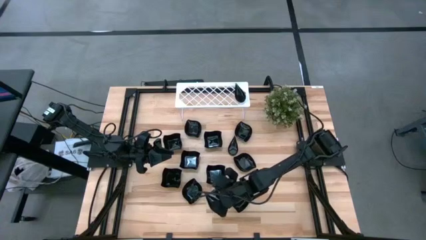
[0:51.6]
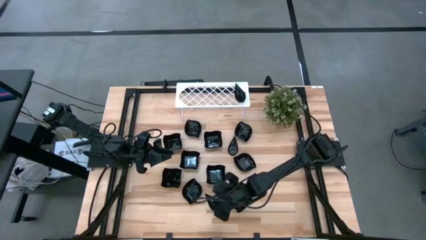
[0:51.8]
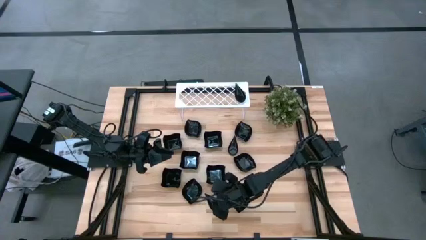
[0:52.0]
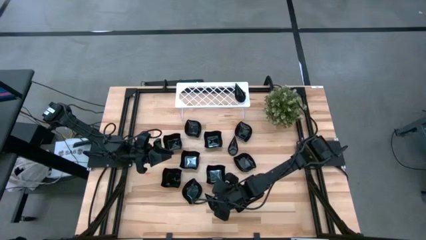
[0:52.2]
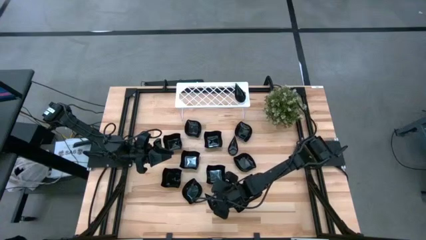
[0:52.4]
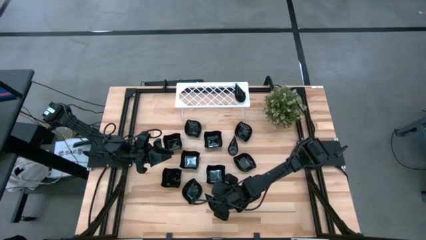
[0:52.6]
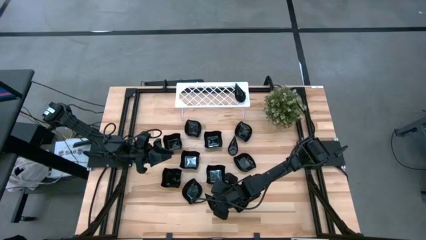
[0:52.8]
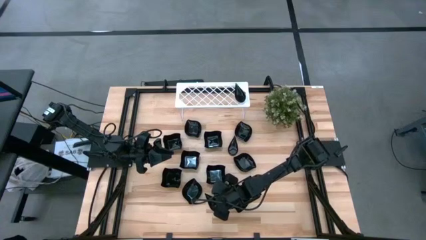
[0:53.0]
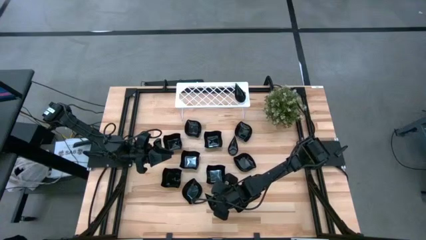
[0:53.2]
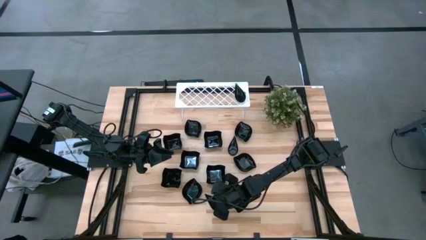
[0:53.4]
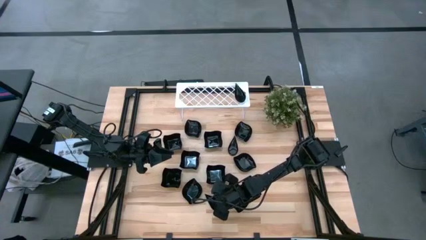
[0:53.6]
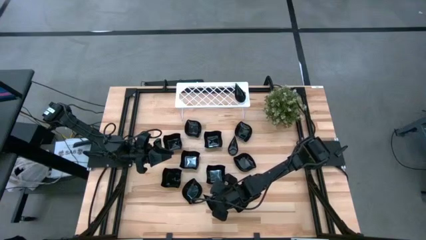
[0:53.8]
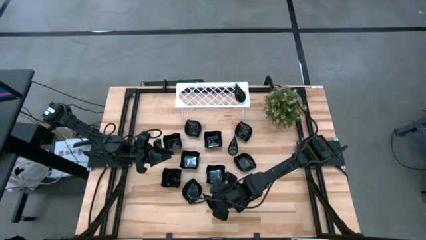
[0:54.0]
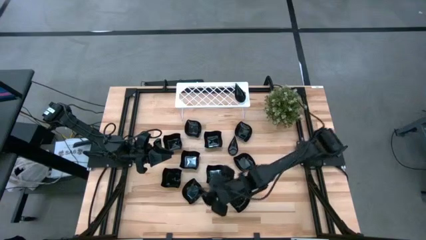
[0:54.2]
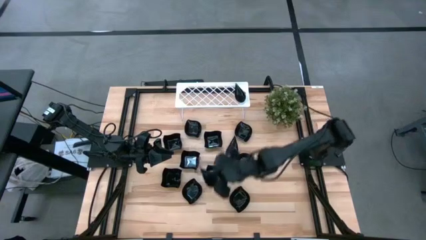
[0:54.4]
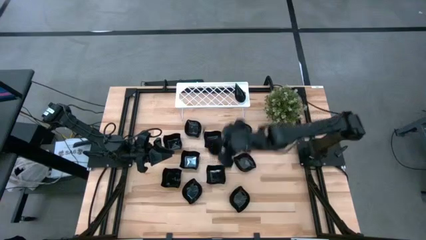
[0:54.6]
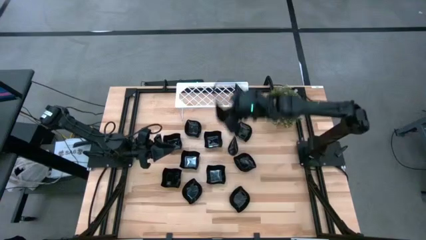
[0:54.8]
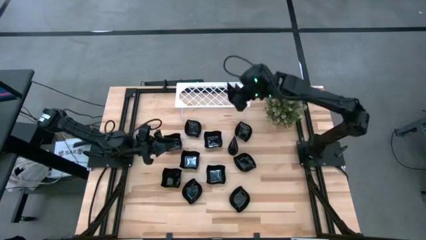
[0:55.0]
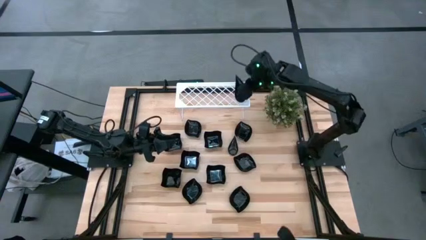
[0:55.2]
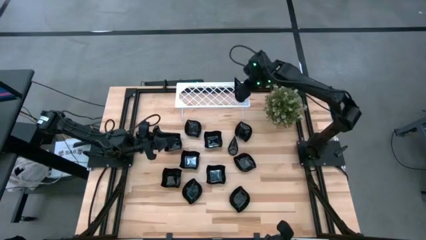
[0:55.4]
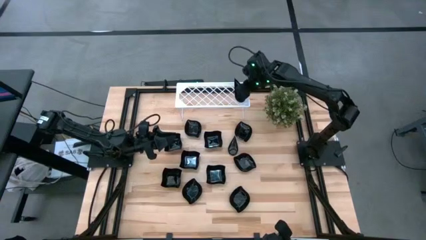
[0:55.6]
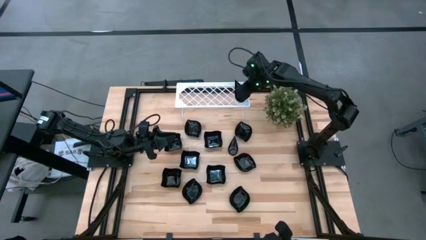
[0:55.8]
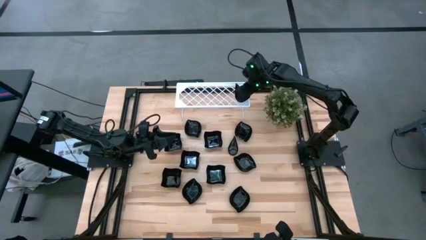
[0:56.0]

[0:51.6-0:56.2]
Task: Pick & Place Mini shaped plates
Stack the drop-shaped plate on top of the drop-shaped plate on the shelf

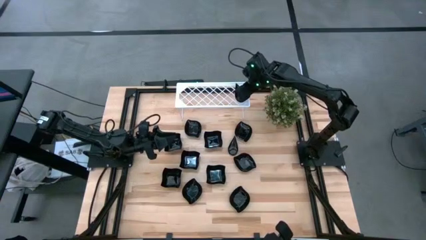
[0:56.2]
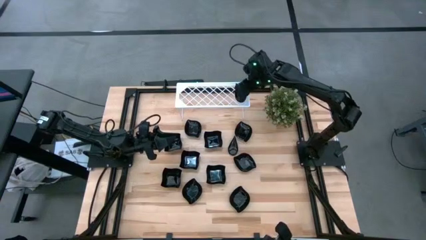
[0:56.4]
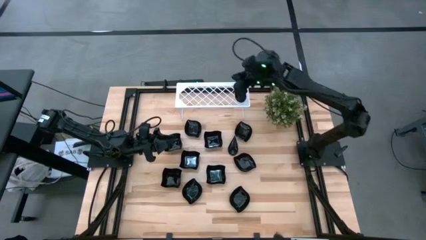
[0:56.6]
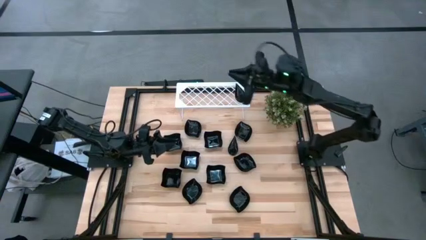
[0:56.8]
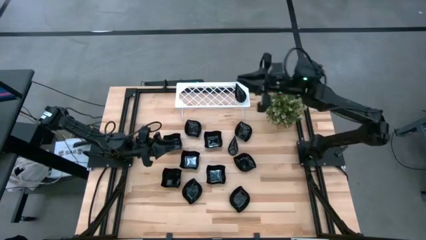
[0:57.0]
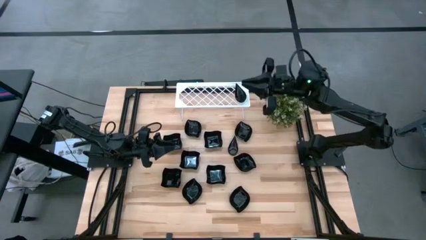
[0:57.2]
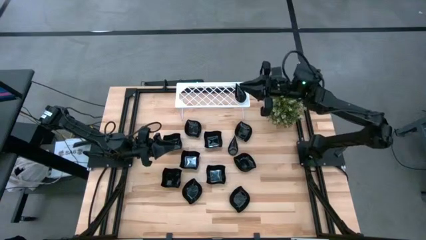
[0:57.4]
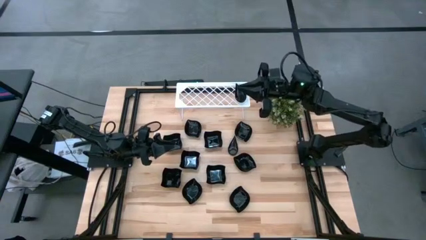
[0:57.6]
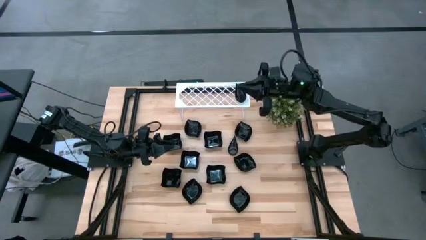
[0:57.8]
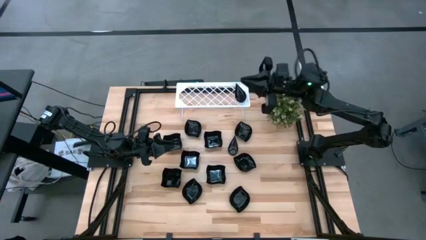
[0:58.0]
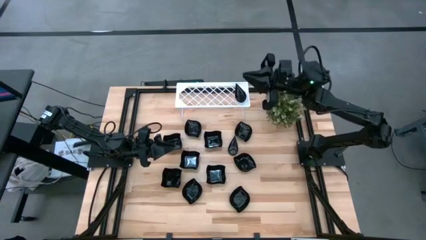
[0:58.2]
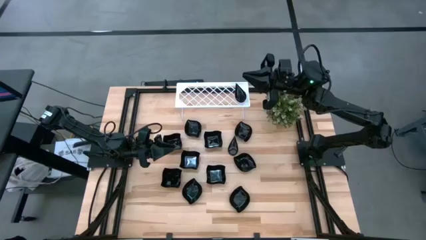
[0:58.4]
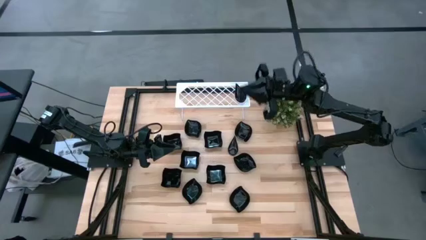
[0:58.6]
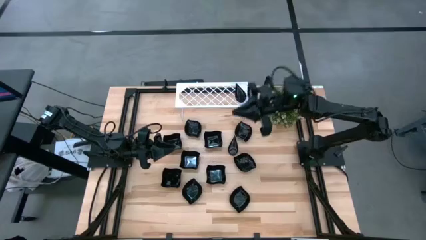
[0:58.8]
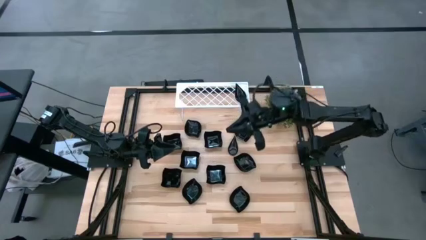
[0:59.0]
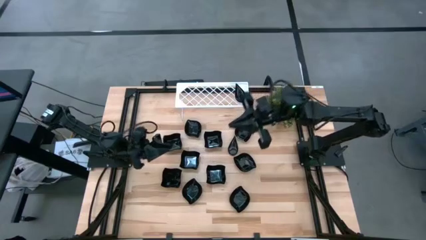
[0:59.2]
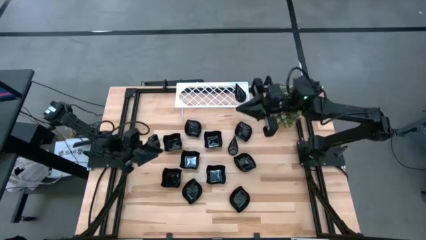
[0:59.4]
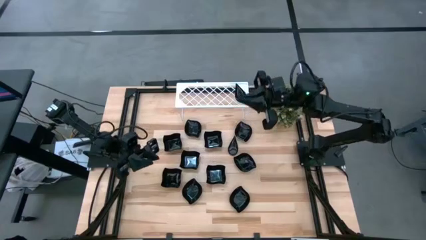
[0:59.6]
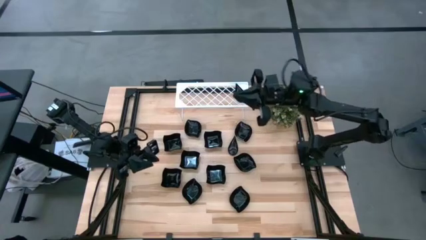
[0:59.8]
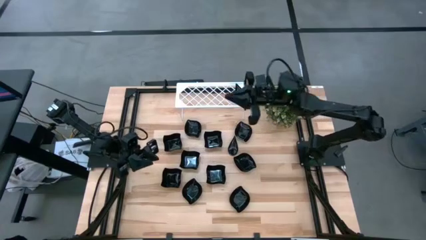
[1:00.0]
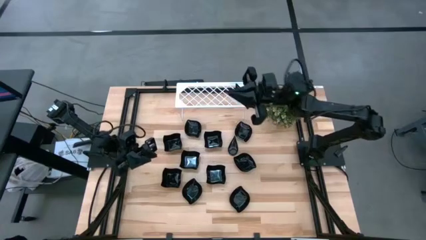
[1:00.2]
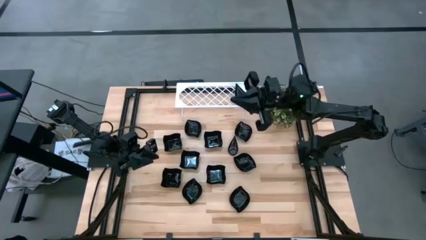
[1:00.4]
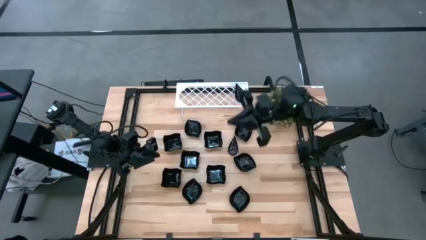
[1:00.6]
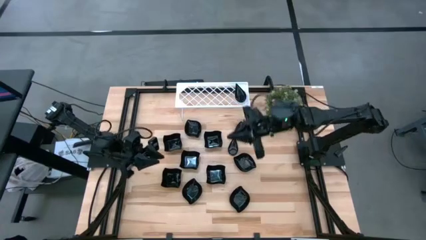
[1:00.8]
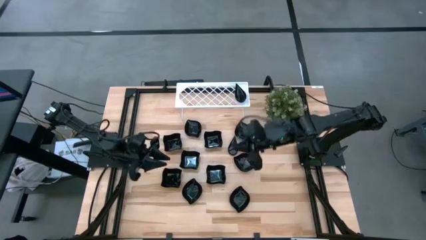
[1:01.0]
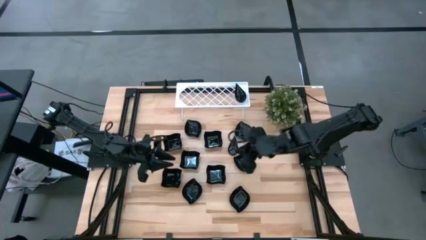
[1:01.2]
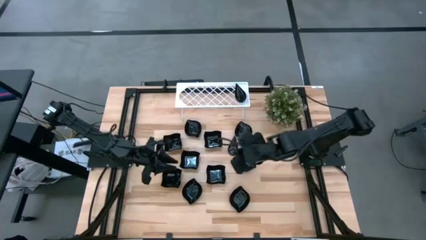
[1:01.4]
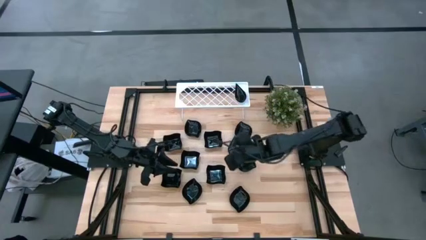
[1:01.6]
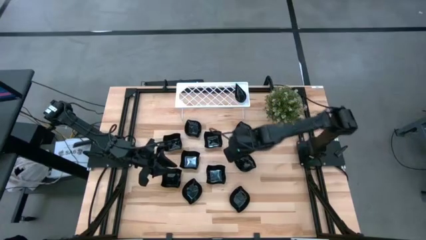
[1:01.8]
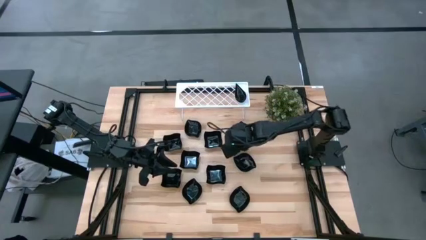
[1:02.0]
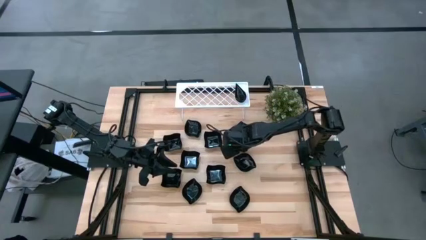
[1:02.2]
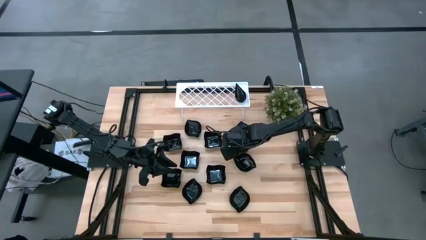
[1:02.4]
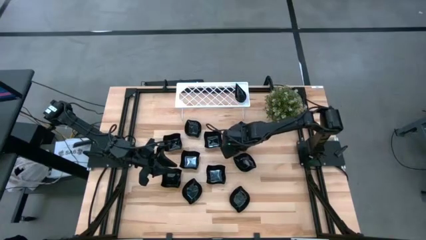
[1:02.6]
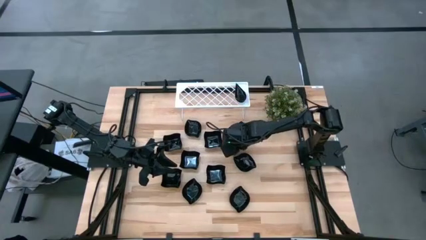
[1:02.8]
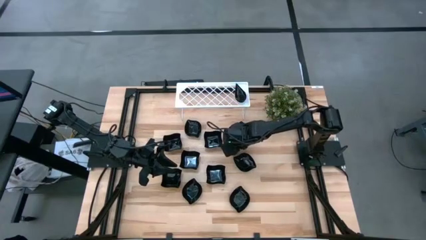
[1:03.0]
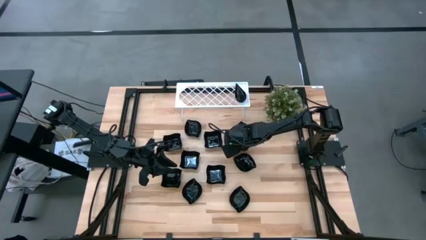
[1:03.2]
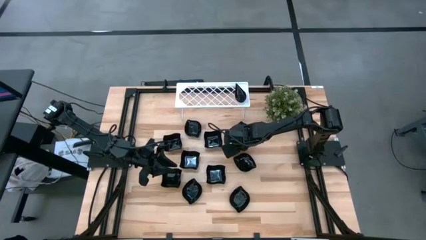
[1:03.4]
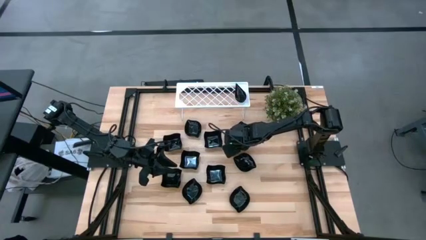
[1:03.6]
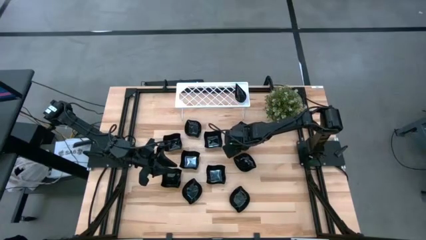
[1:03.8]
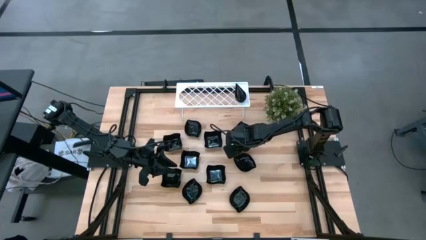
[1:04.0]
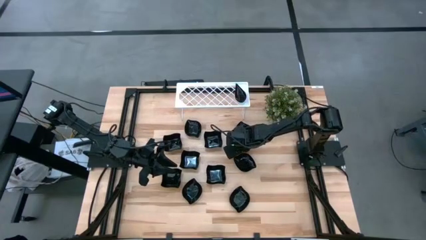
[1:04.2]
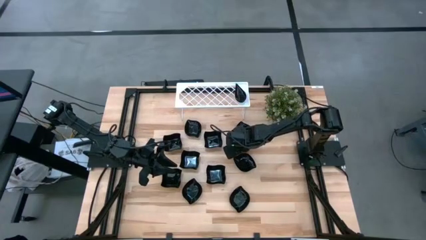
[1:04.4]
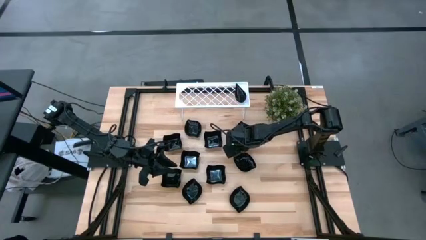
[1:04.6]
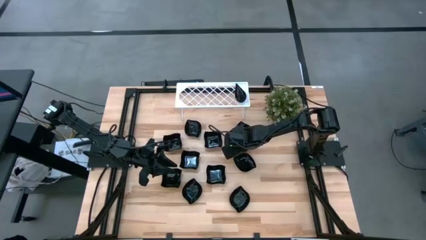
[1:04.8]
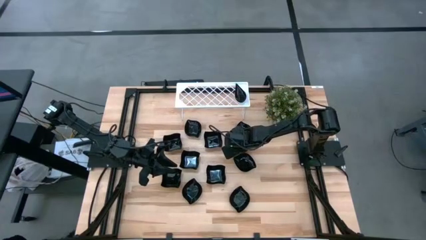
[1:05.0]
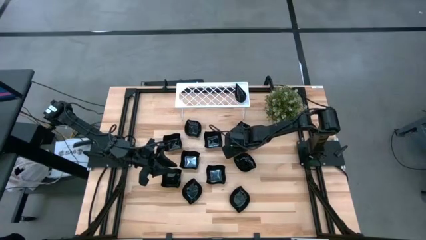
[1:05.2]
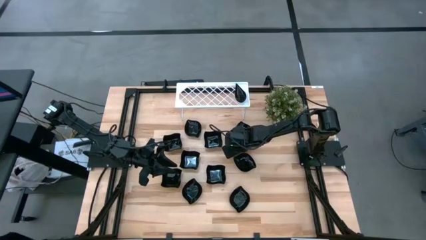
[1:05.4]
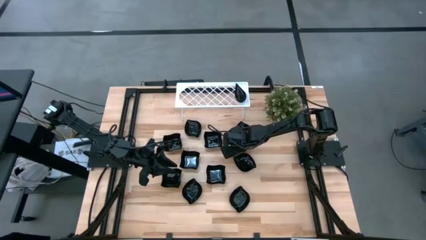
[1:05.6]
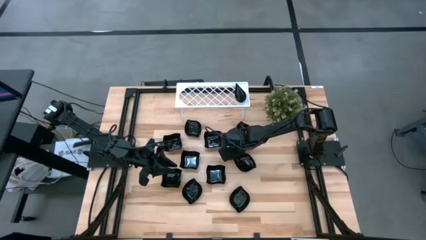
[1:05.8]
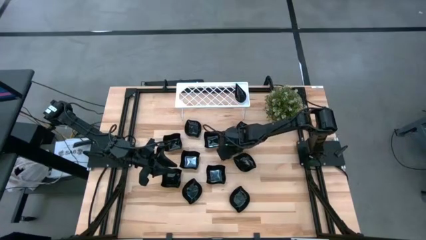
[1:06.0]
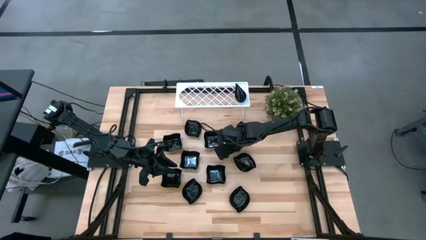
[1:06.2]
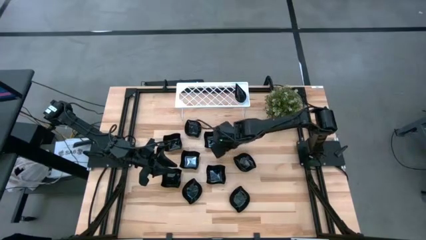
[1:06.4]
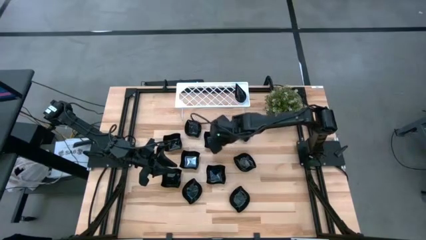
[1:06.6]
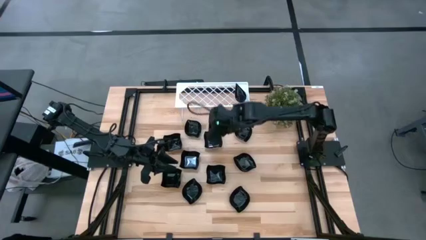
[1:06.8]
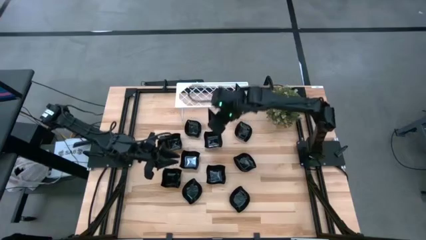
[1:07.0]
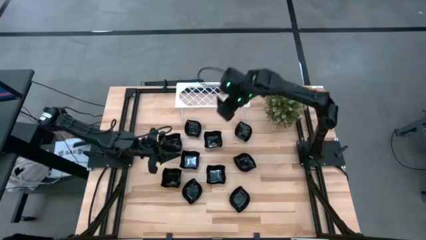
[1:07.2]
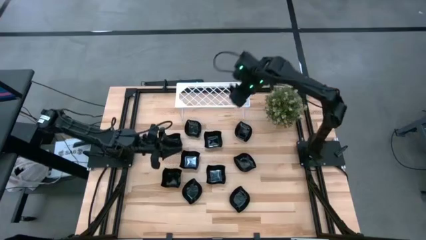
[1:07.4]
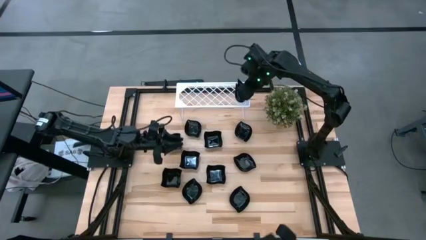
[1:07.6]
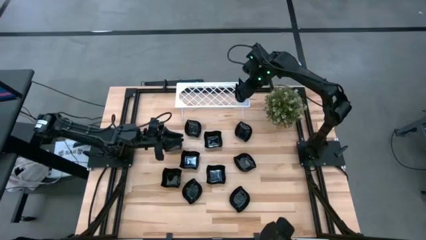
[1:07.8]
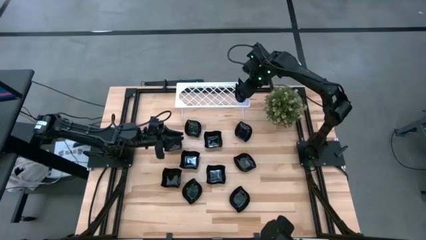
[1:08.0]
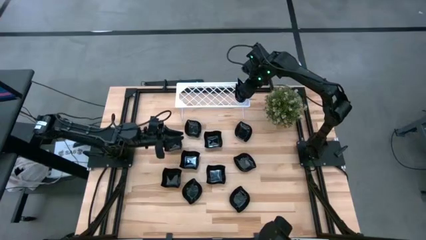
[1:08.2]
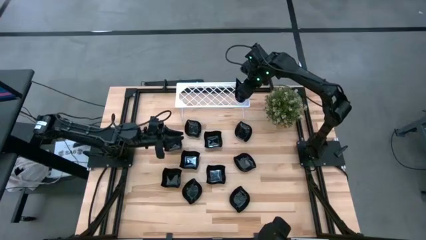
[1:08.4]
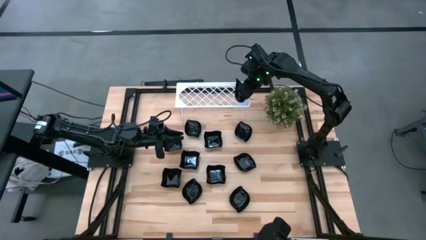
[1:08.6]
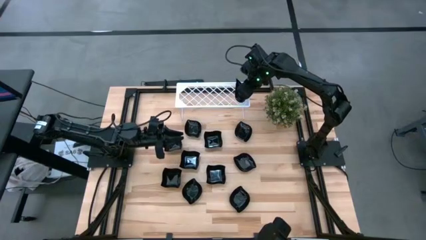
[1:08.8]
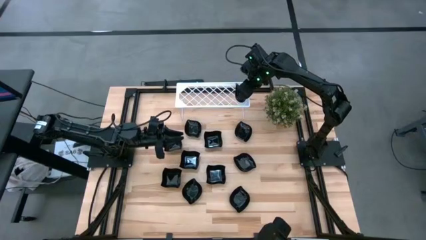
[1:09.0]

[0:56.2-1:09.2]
Stack the drop-shaped plate on top of the drop-shaped plate on the shelf
